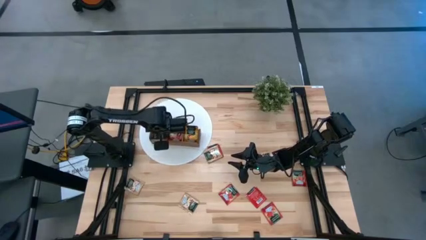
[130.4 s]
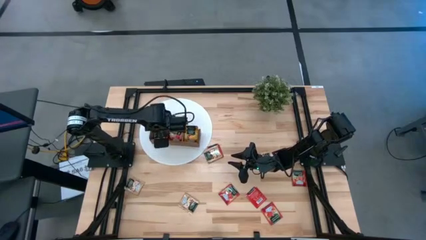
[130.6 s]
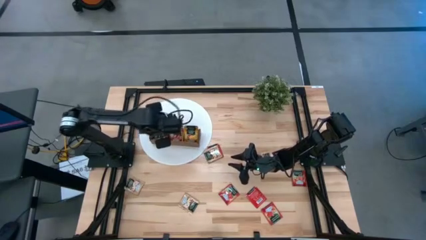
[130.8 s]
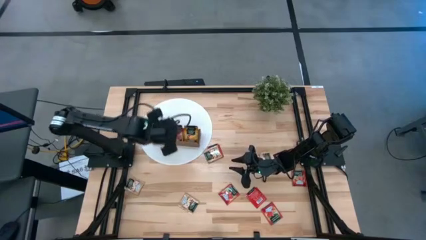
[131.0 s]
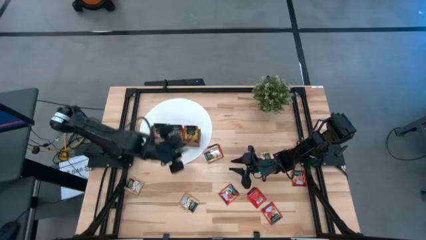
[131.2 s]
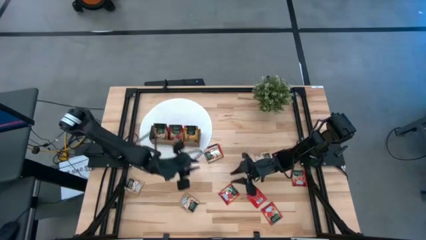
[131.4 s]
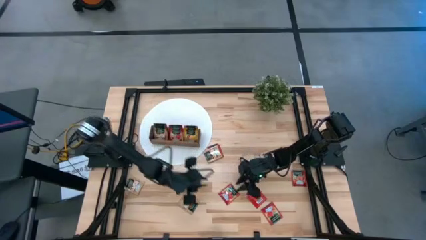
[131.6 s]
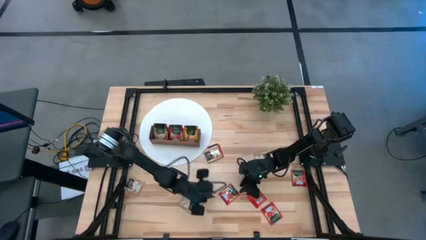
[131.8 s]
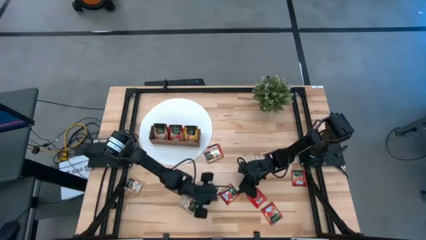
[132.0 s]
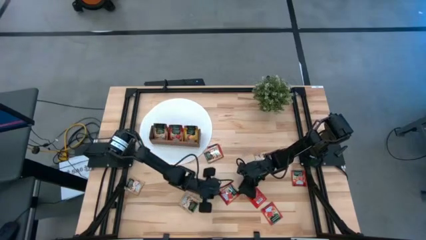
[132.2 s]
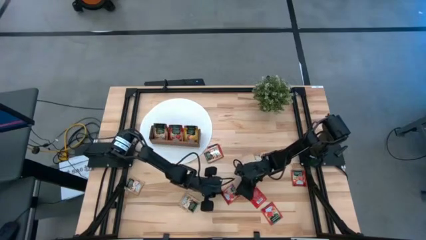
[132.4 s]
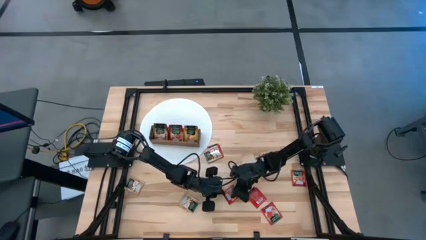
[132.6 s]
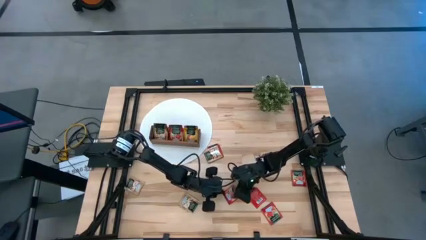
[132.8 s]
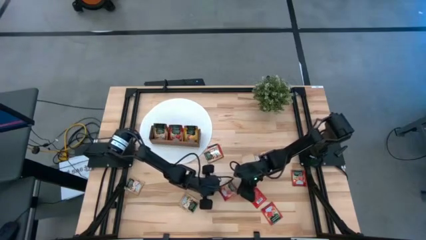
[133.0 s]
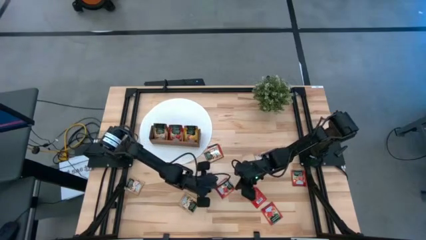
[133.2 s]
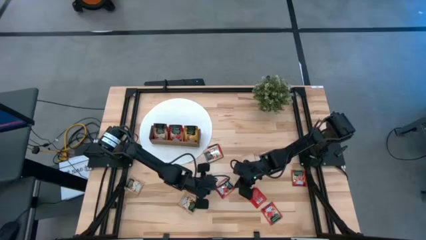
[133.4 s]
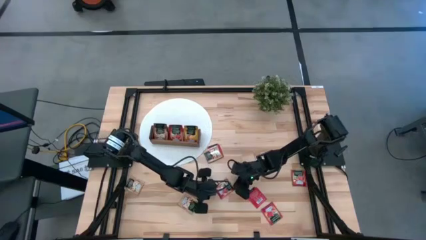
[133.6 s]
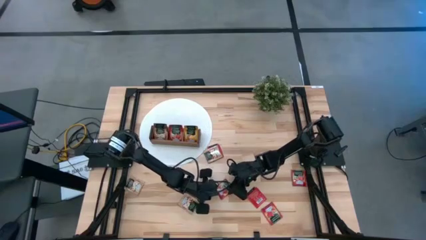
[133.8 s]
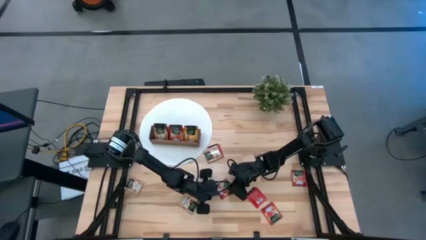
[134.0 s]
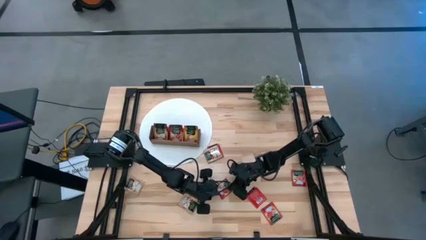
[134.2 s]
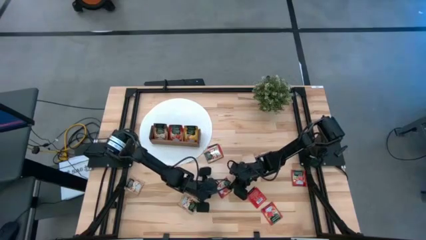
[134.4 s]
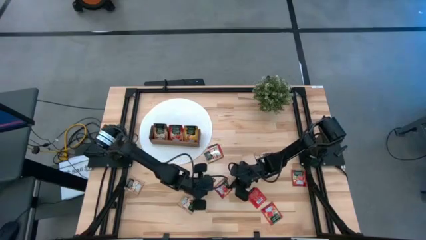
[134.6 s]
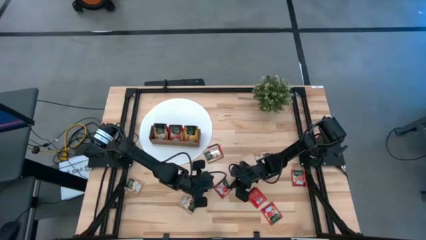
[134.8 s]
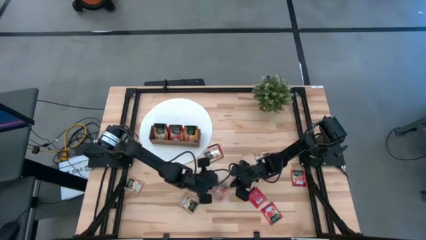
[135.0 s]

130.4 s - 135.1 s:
Task: Pick & Place Tea
Put the red tea bag into the middle section of the wooden organizer

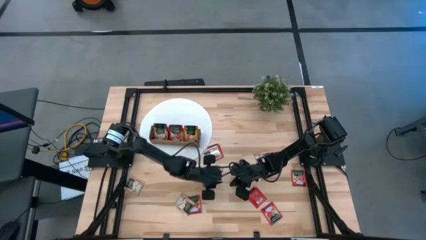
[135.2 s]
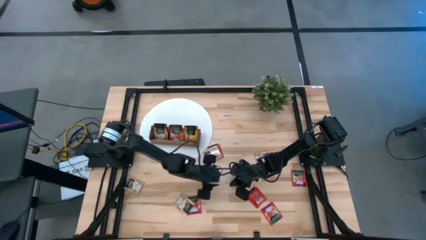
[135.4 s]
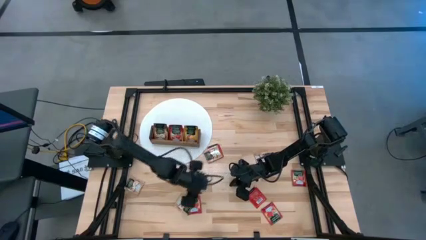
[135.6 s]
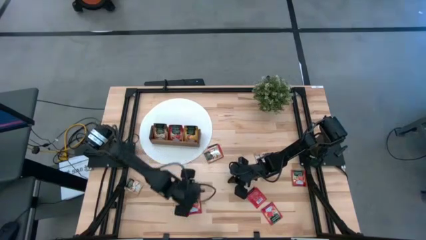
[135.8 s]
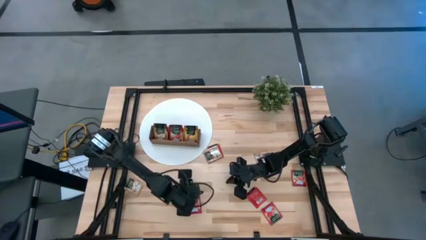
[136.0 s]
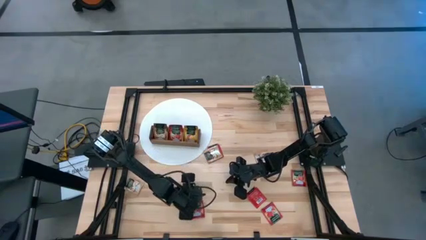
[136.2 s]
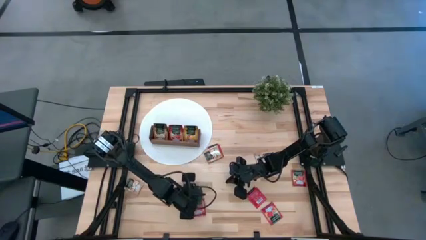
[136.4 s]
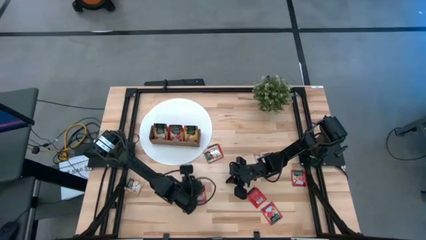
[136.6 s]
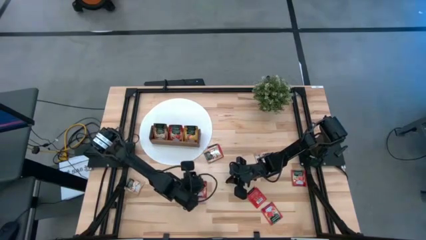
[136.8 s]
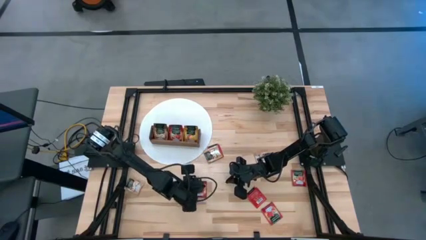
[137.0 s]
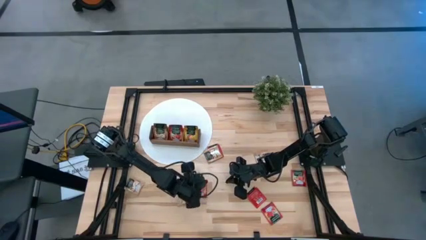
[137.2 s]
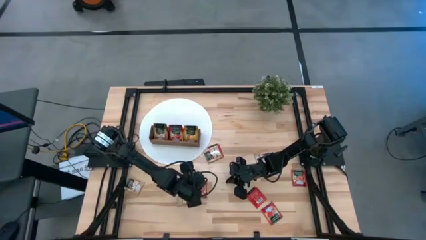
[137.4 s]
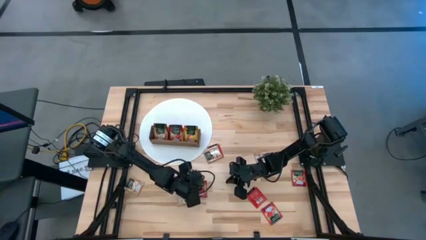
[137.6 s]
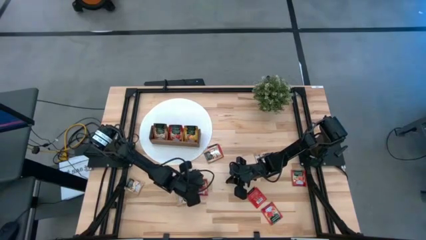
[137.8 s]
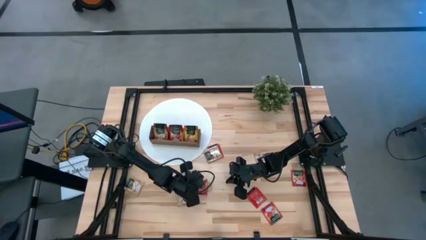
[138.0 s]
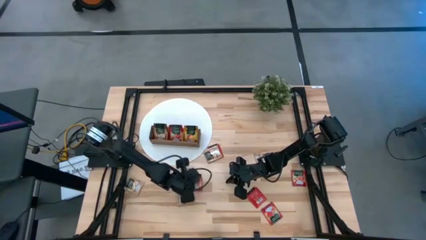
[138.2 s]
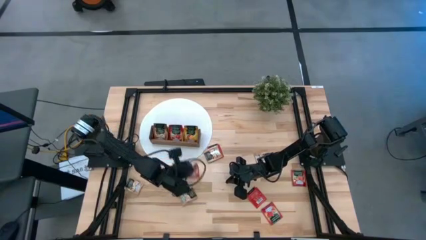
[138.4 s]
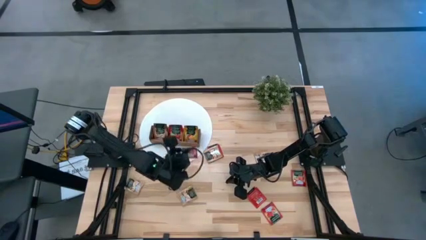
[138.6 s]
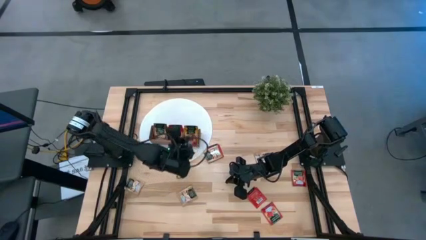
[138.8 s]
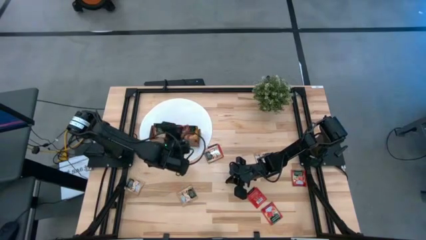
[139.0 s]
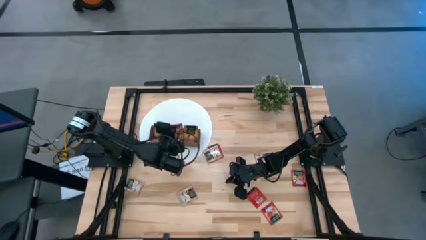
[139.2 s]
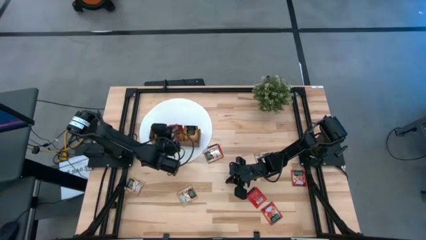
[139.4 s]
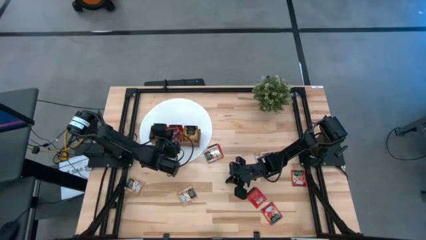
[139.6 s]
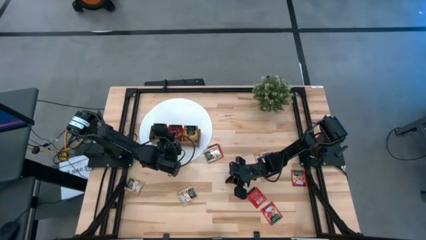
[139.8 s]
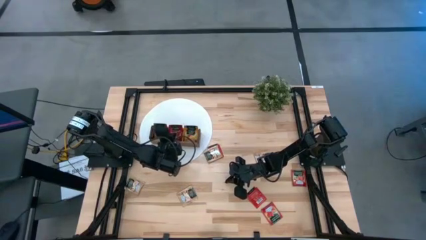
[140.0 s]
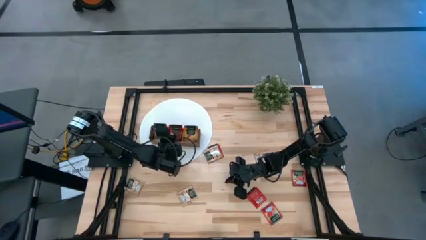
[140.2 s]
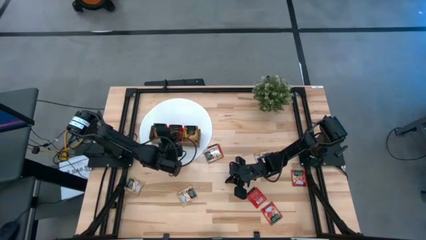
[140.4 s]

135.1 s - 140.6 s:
Put the red tea bag into the middle section of the wooden organizer

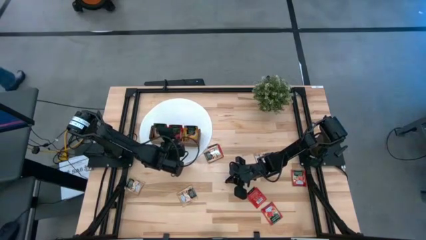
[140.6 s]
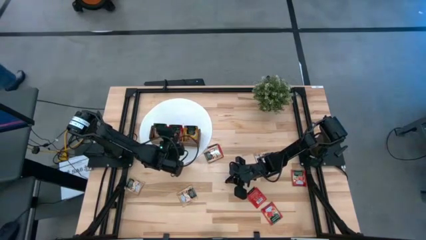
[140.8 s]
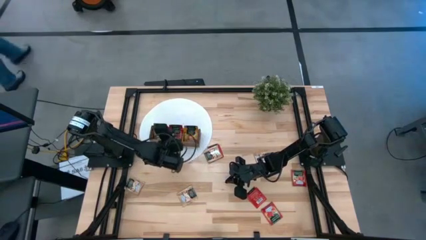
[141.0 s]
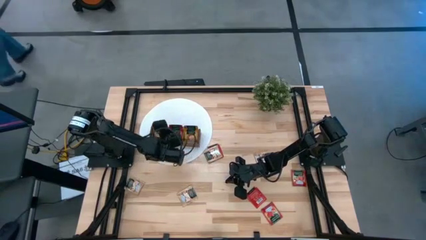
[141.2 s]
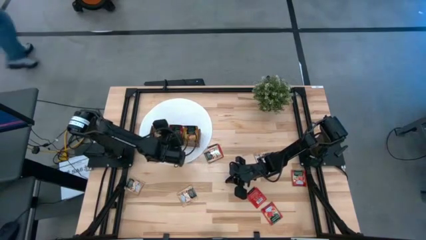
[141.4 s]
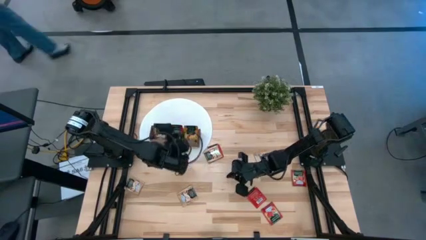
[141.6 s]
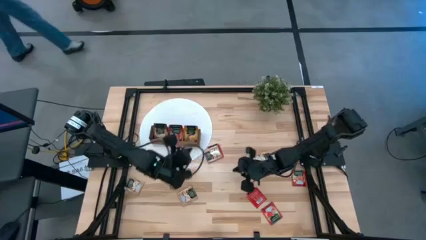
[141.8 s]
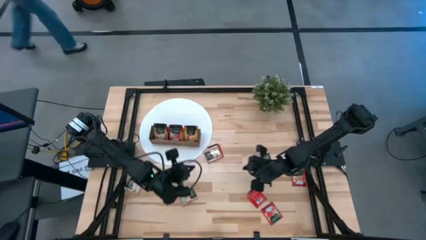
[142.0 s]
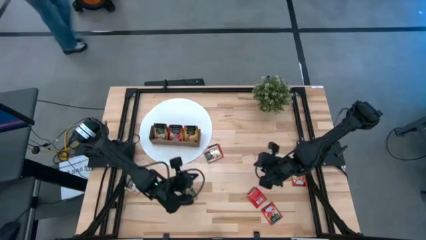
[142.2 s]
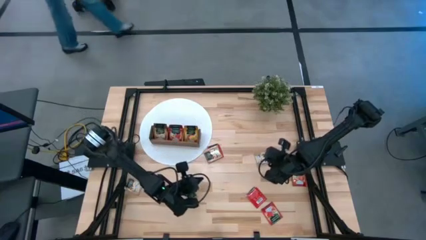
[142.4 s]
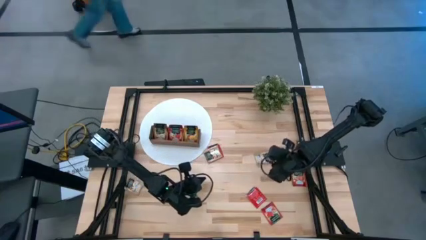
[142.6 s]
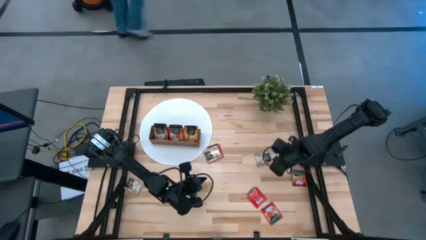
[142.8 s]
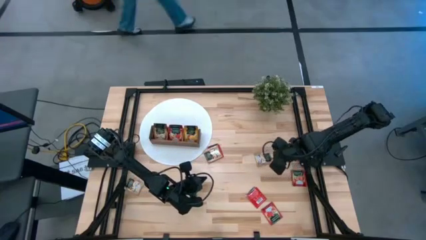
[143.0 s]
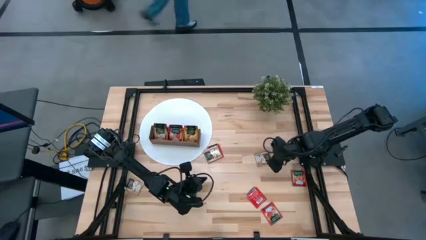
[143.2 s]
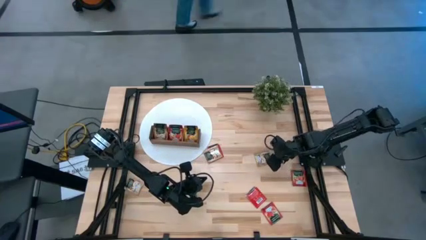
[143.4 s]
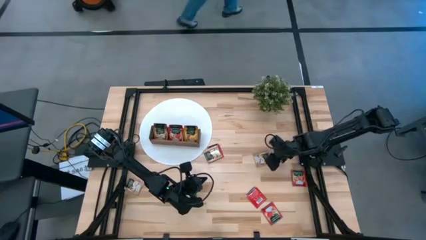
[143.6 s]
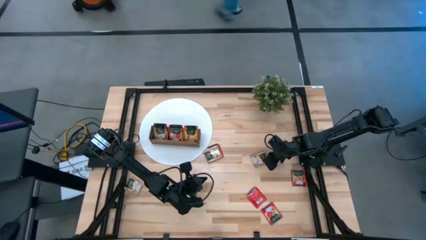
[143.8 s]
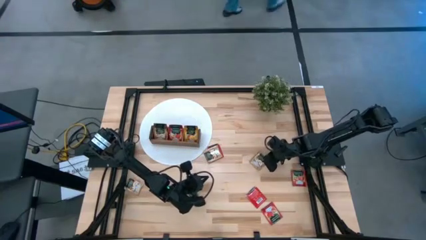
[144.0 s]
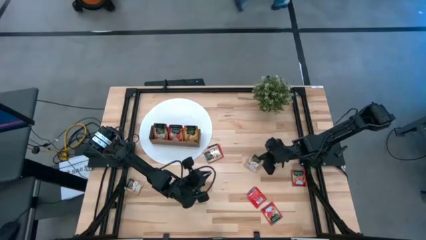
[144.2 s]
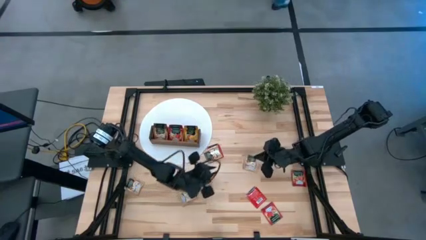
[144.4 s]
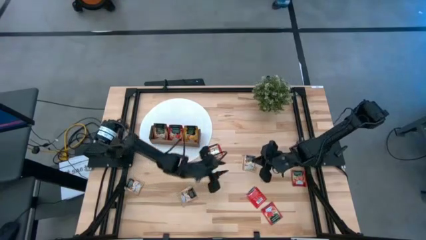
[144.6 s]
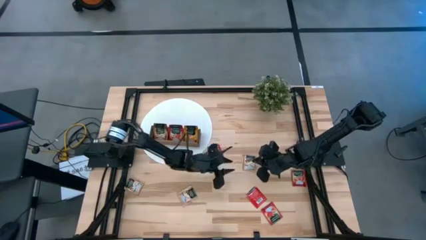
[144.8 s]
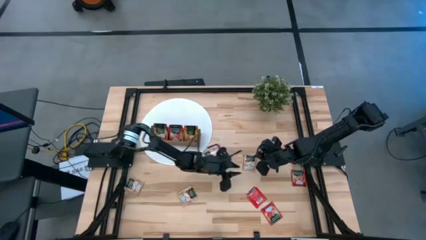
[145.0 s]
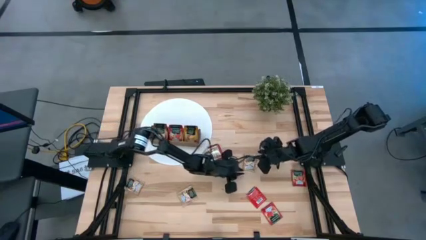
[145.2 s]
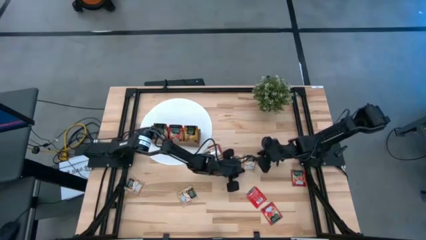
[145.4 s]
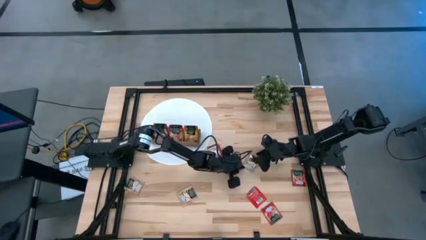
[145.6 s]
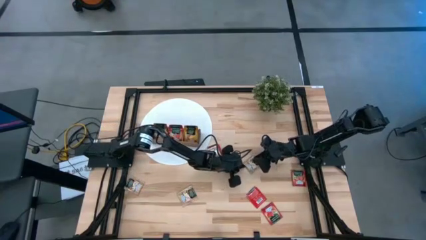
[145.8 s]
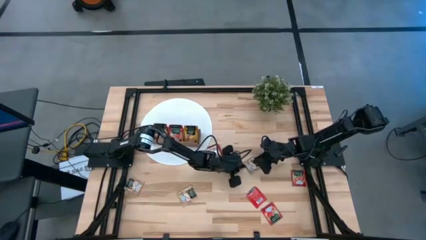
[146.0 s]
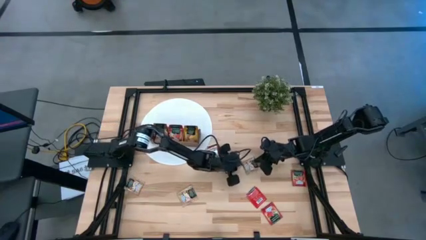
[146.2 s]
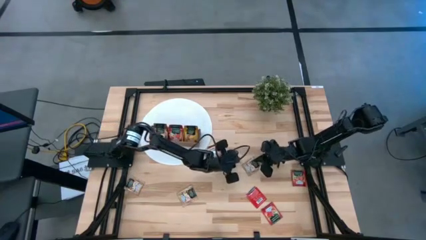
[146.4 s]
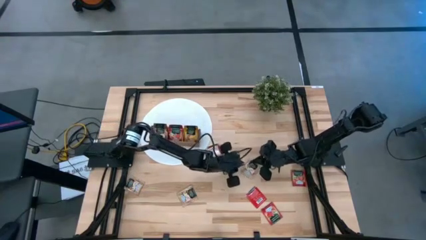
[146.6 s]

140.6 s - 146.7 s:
Put the brown tea bag into the left section of the wooden organizer
